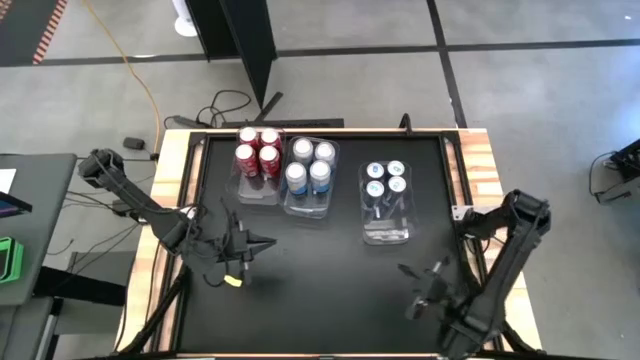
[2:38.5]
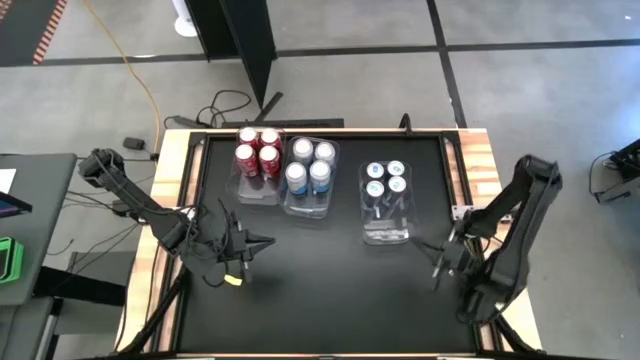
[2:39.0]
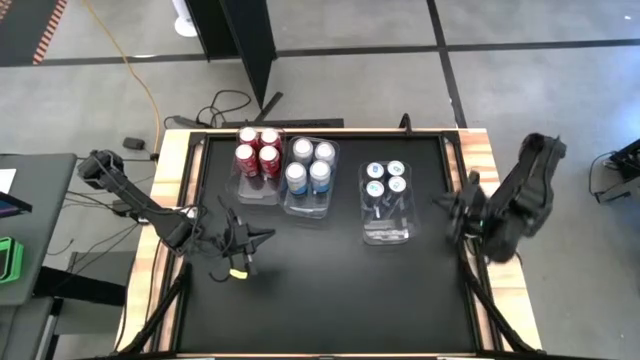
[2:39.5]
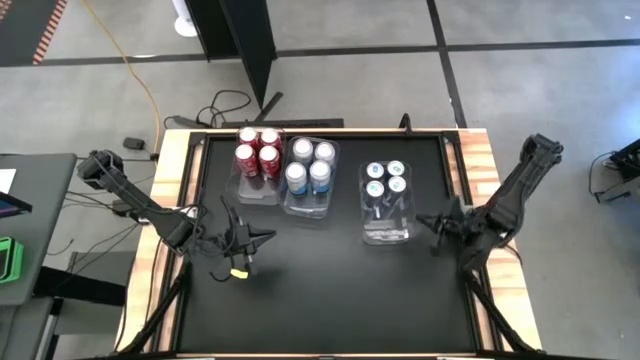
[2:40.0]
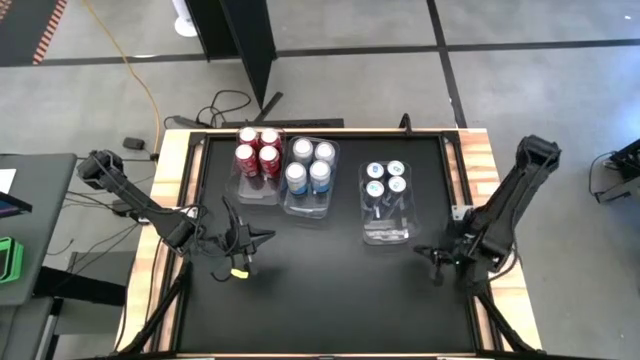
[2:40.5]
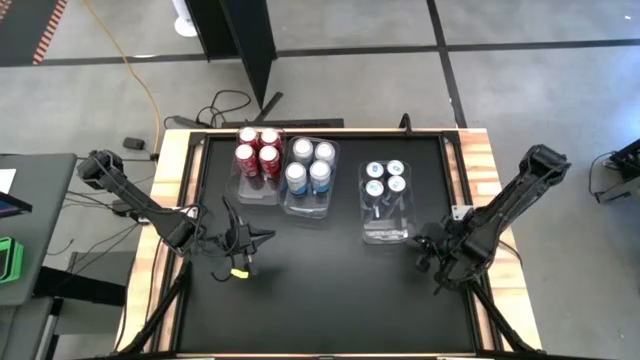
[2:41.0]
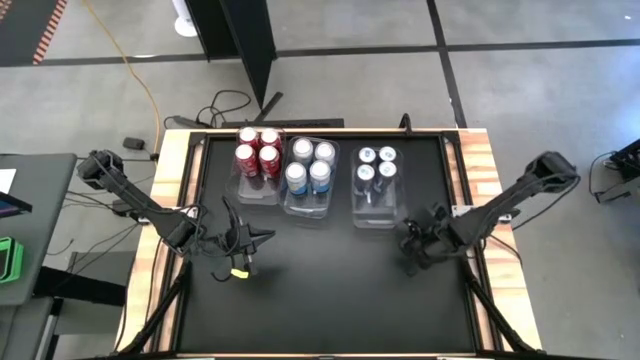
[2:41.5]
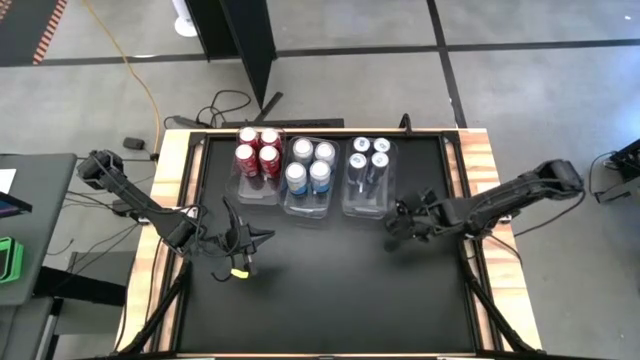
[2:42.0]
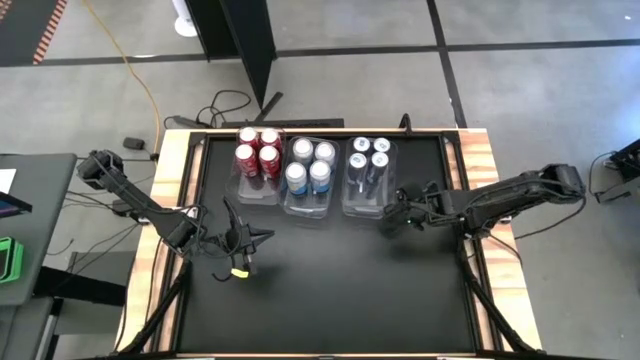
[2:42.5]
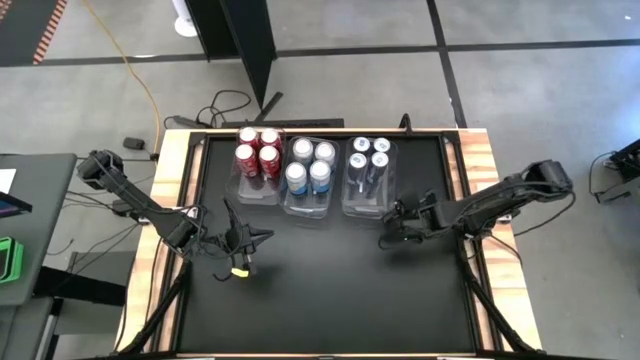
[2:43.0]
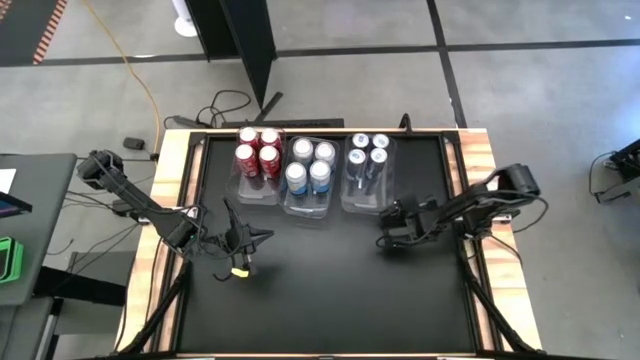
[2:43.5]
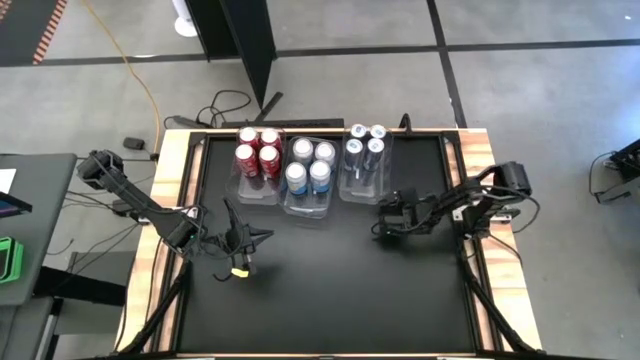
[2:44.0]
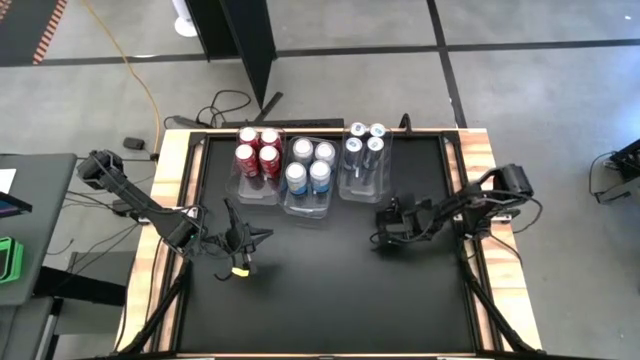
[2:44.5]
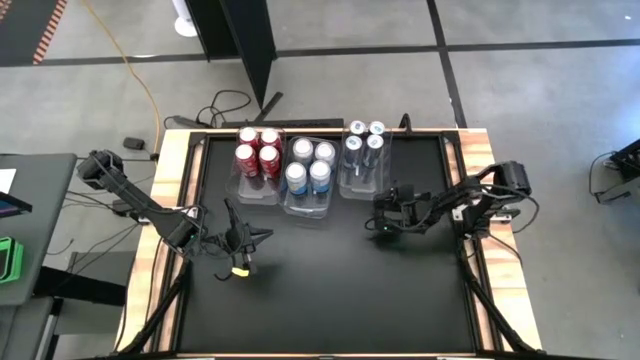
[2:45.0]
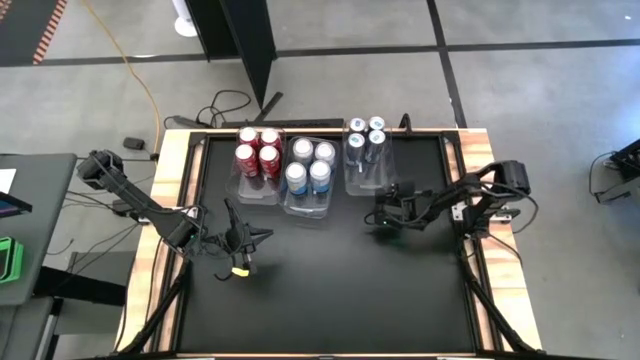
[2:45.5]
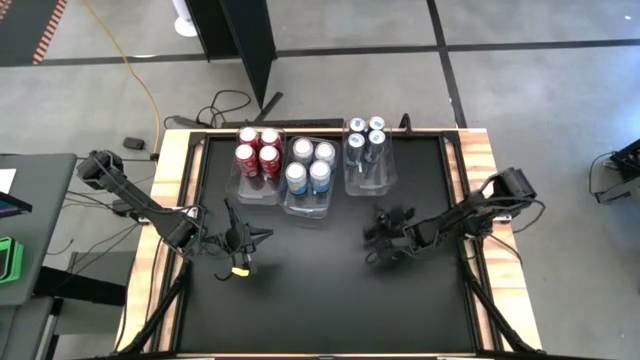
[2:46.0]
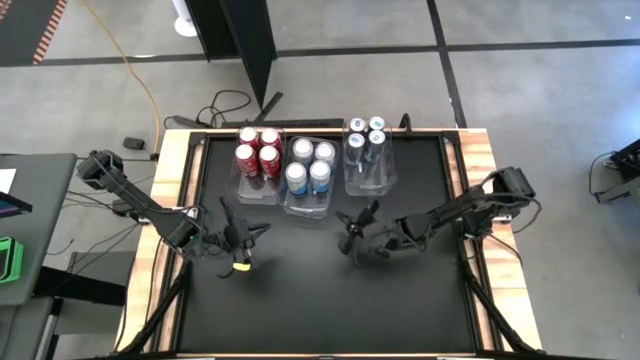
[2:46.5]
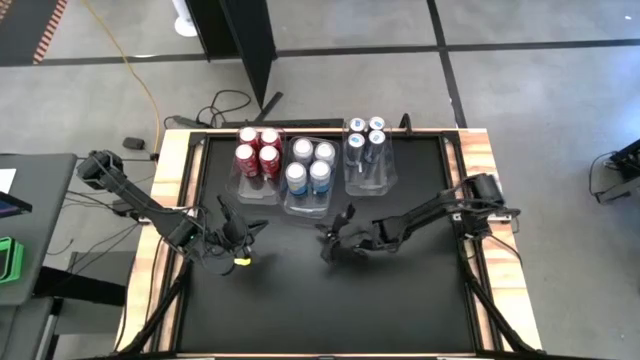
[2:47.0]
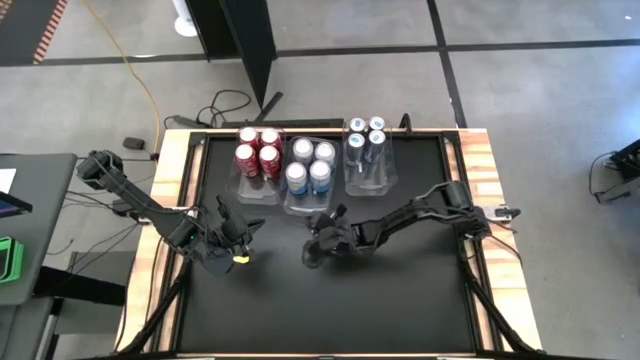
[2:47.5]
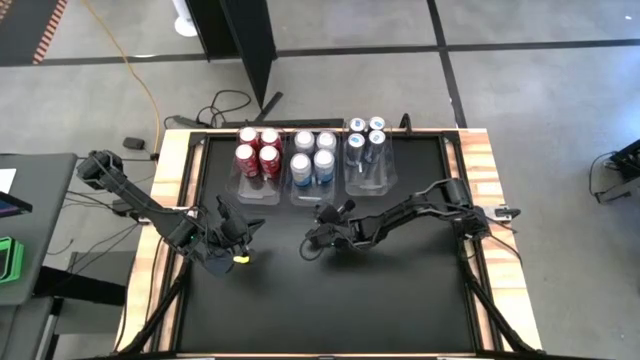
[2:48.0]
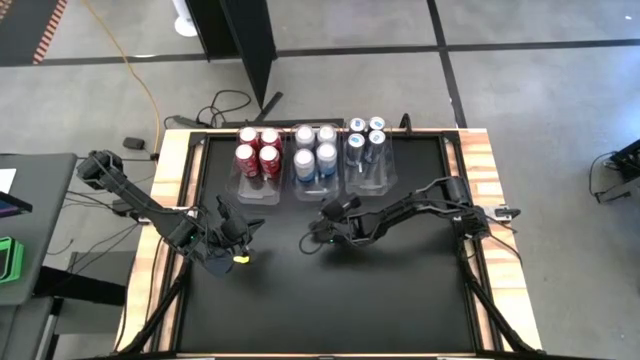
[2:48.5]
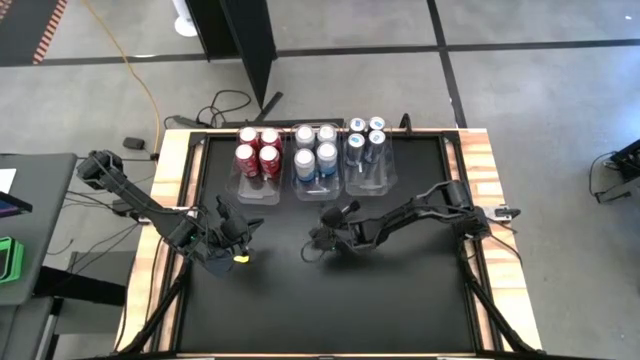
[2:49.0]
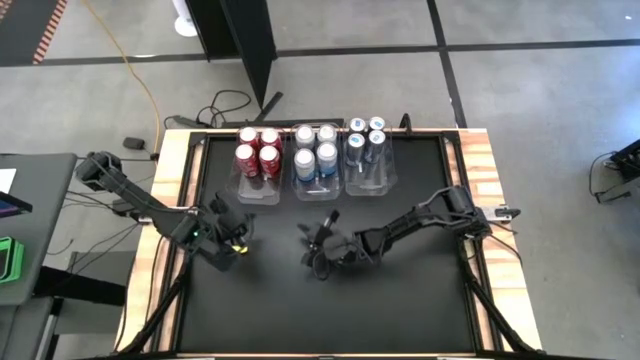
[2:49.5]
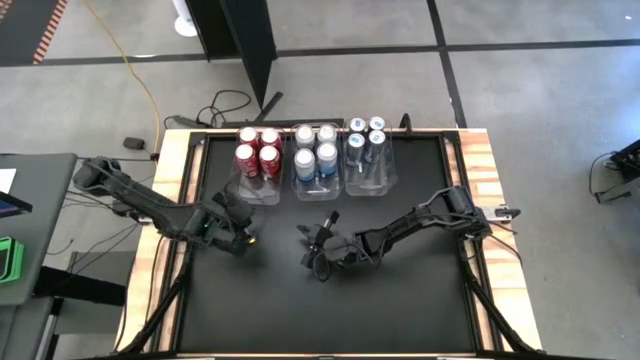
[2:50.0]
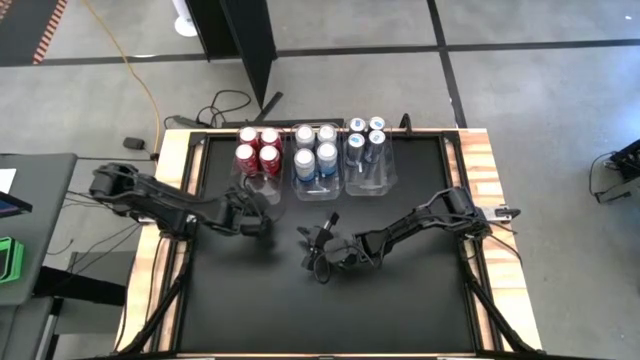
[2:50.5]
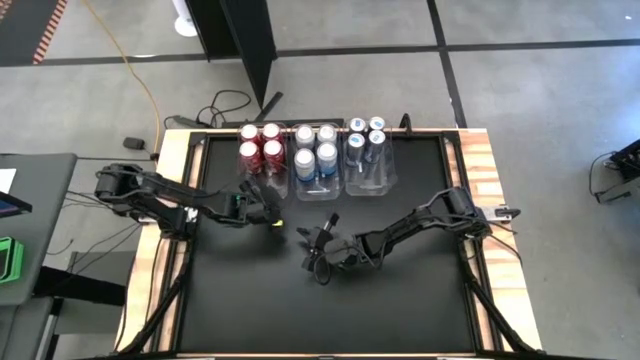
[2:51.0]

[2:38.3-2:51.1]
Task: Sort soda cans
Adjust the transparent bins and align them together

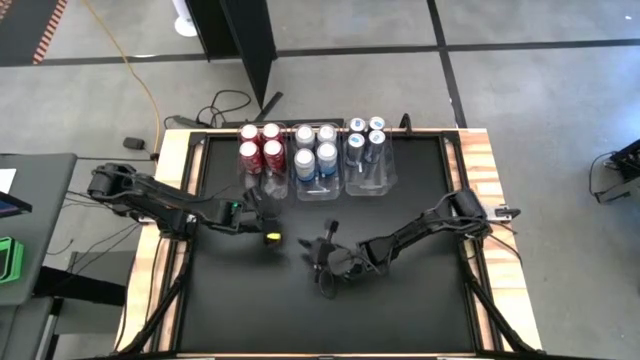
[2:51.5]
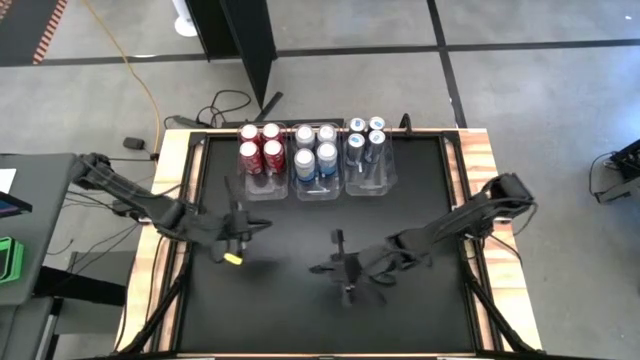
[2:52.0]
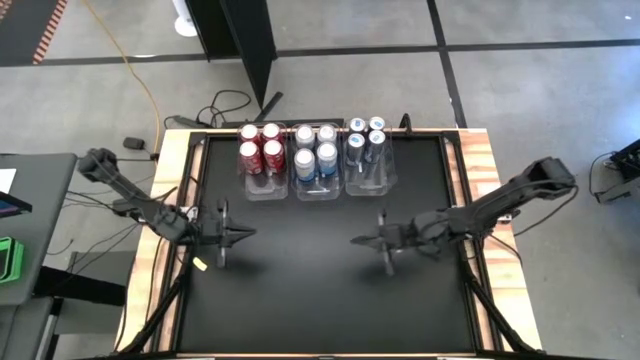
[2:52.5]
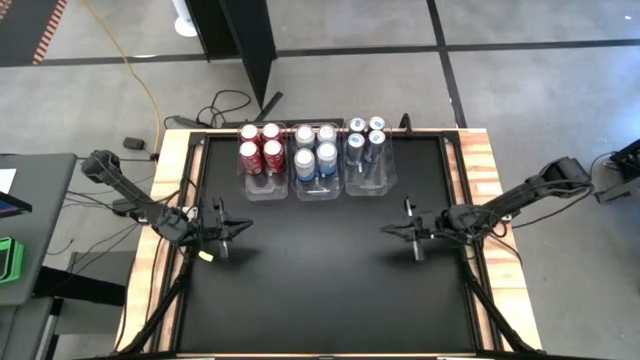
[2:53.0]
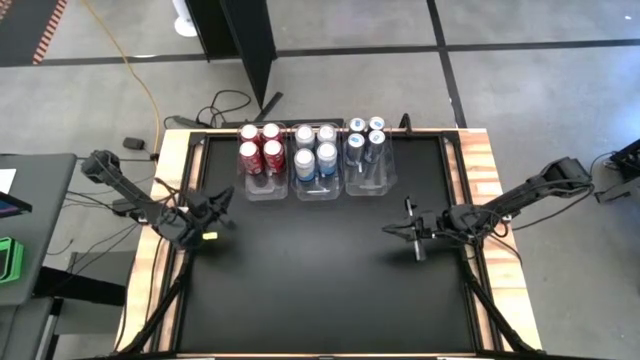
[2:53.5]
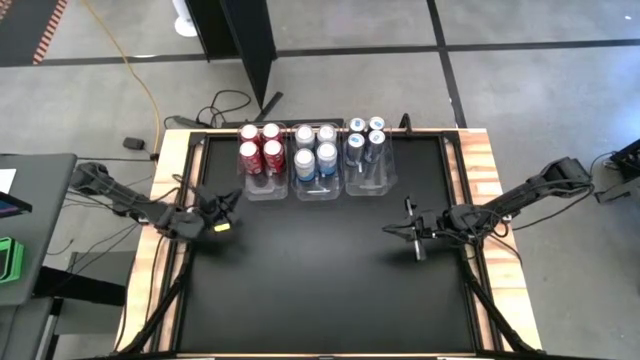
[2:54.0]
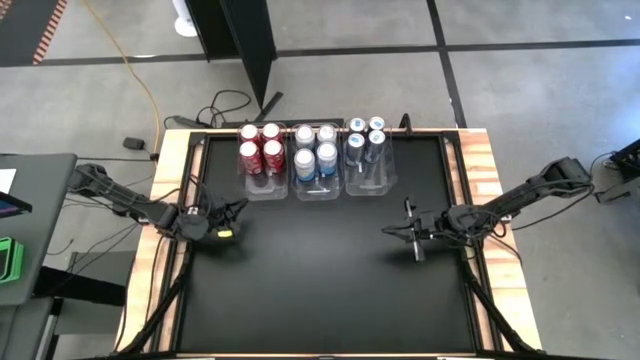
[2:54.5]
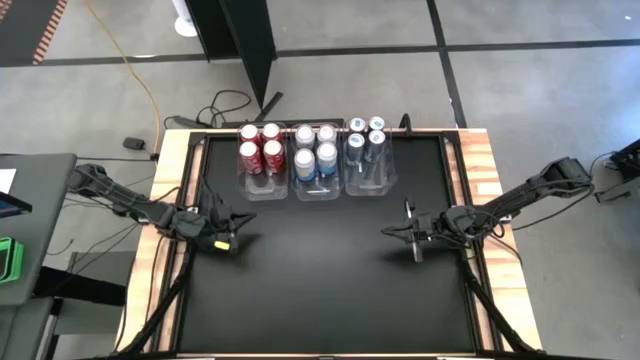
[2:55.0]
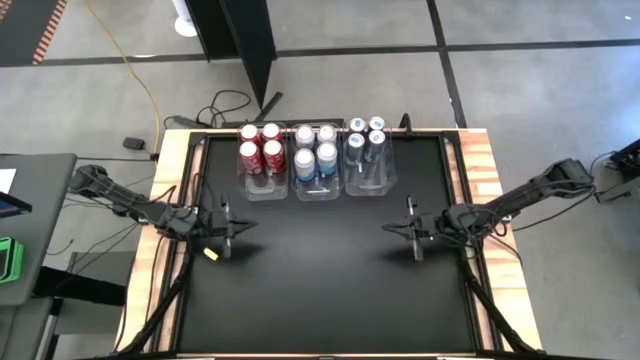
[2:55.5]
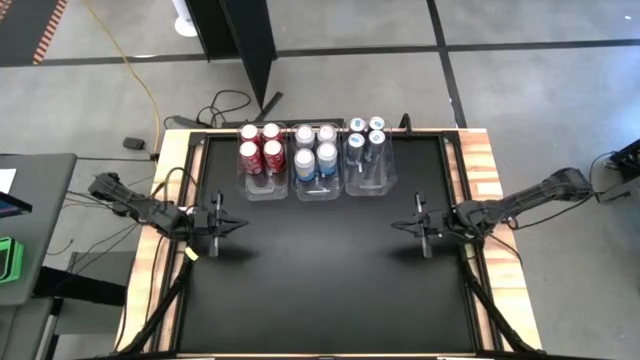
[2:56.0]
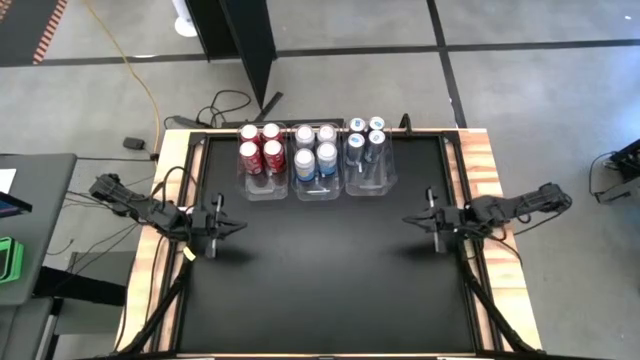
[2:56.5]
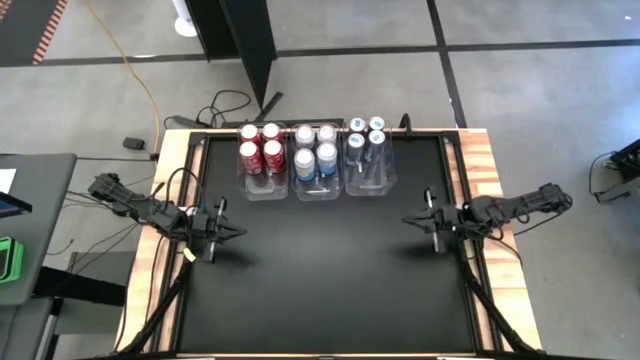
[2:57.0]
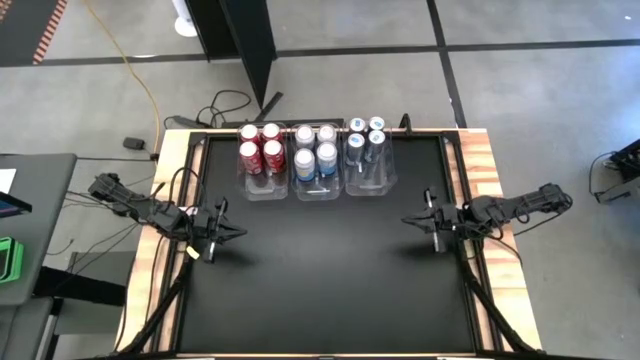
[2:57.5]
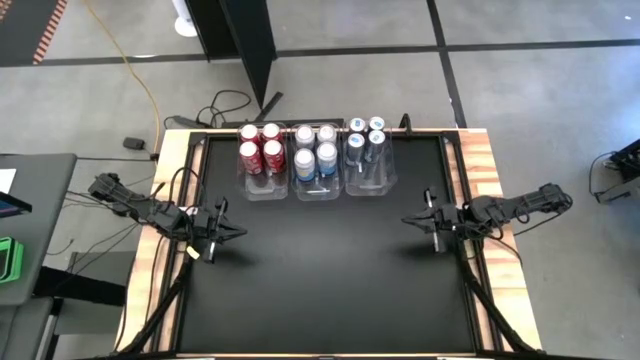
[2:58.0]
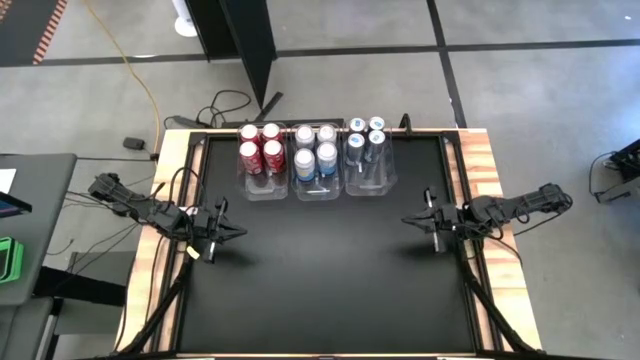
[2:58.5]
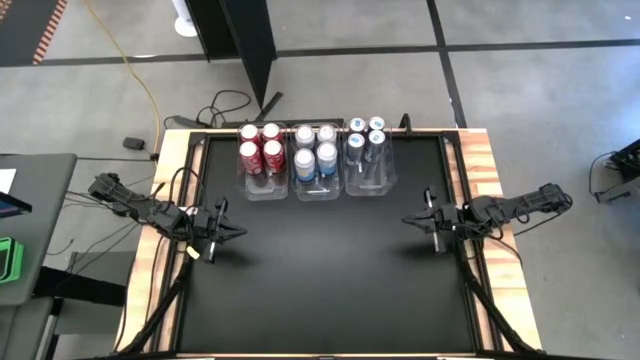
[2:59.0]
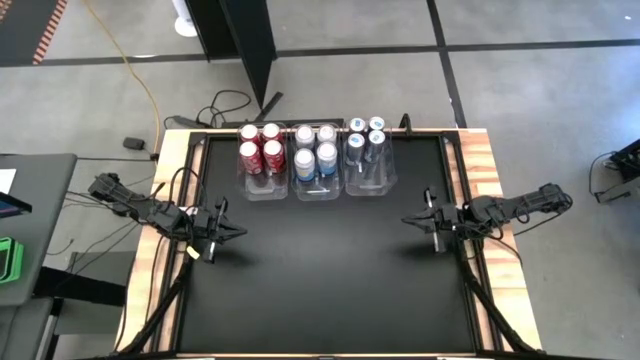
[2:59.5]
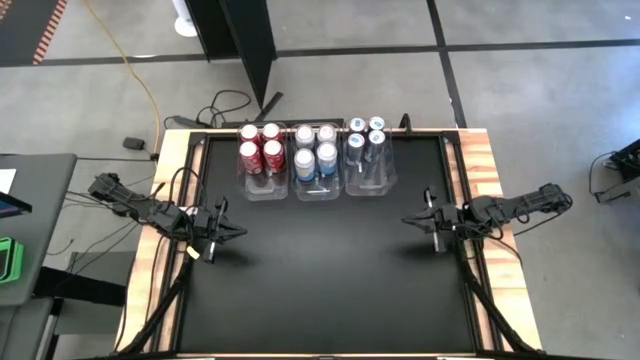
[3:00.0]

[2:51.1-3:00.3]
Return to Home Position
